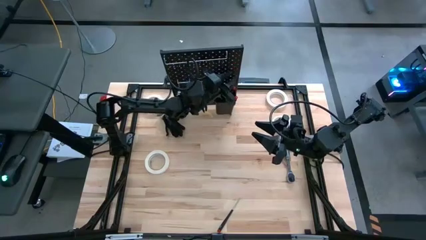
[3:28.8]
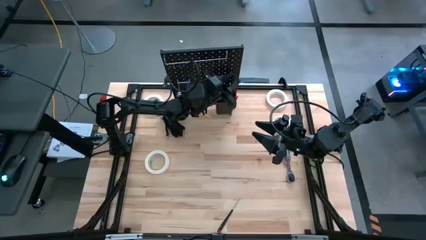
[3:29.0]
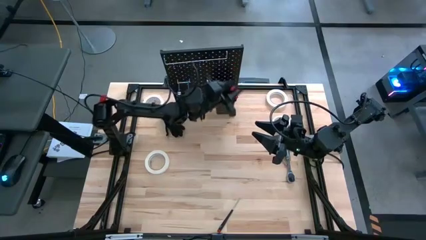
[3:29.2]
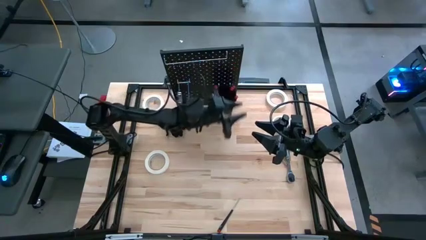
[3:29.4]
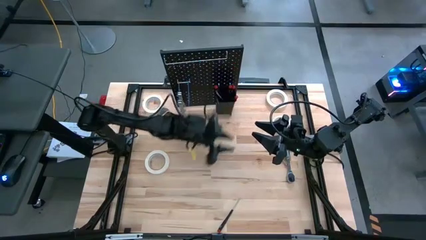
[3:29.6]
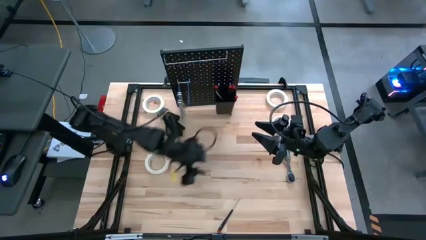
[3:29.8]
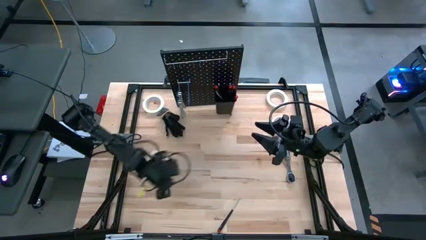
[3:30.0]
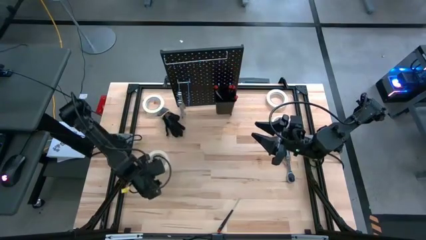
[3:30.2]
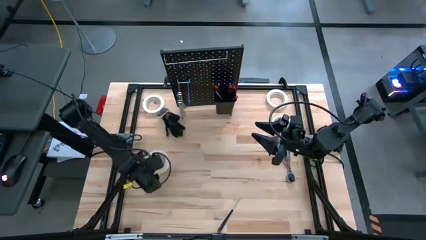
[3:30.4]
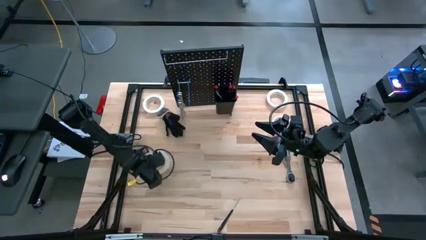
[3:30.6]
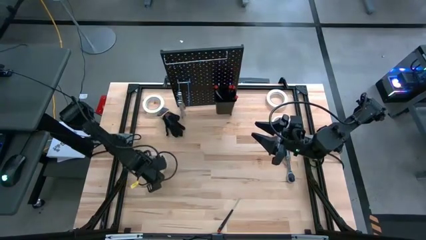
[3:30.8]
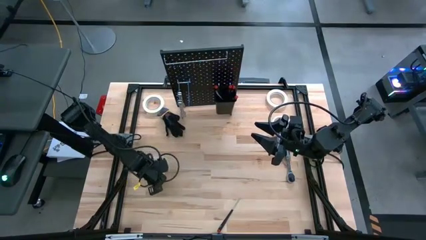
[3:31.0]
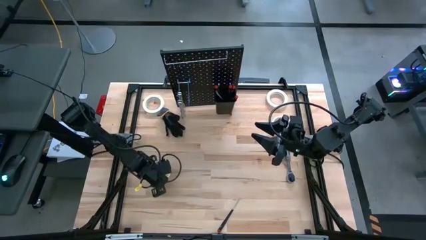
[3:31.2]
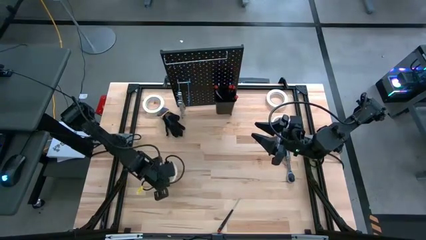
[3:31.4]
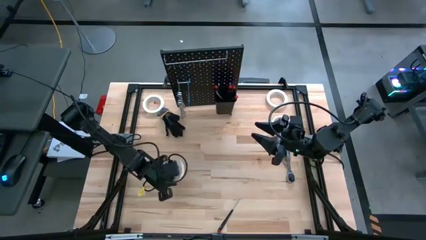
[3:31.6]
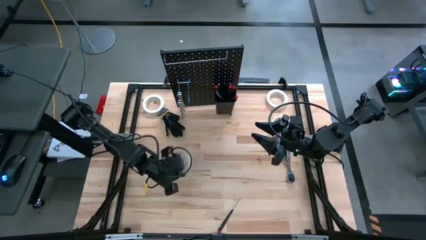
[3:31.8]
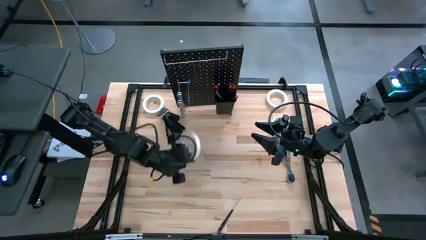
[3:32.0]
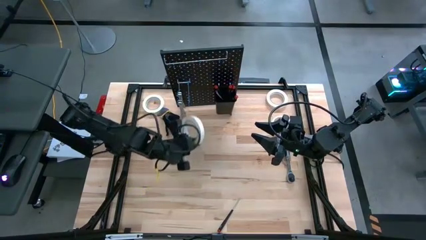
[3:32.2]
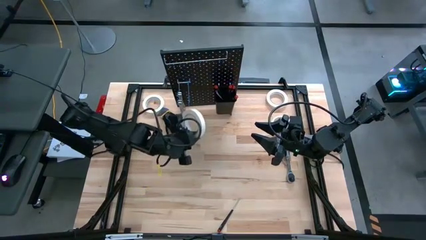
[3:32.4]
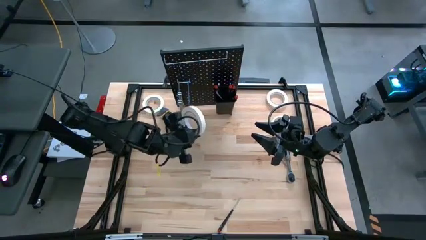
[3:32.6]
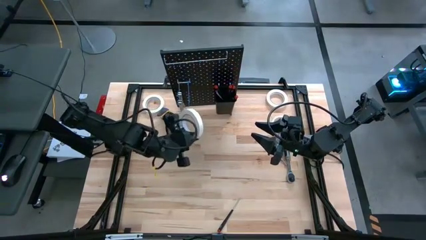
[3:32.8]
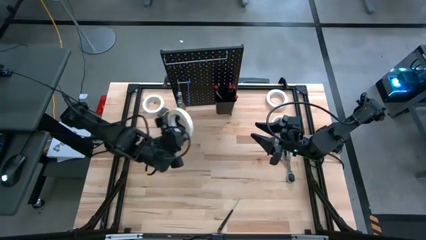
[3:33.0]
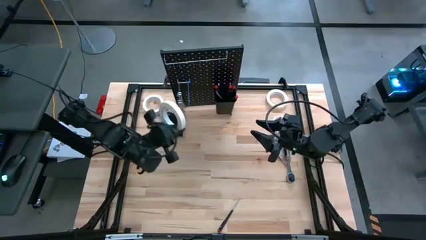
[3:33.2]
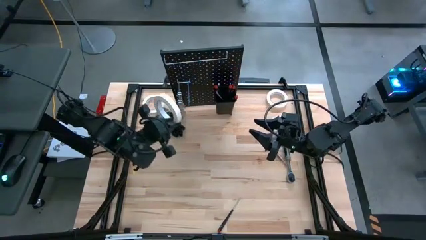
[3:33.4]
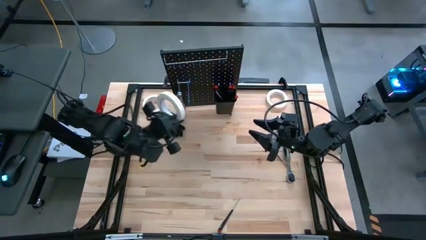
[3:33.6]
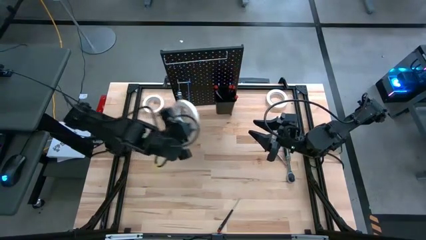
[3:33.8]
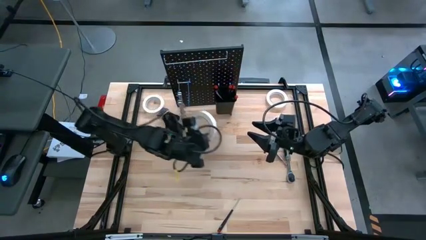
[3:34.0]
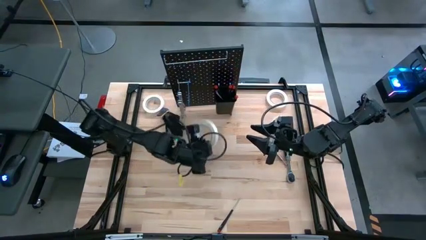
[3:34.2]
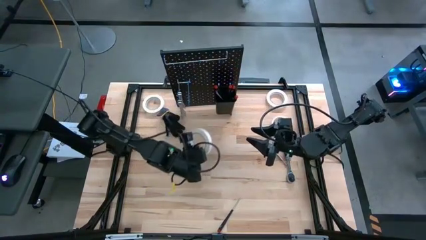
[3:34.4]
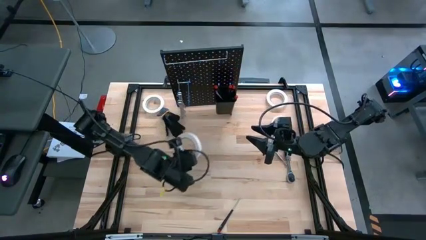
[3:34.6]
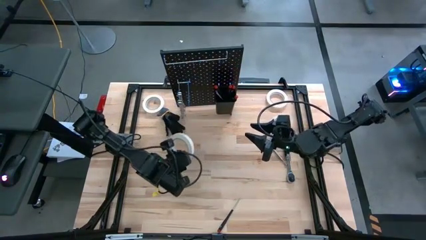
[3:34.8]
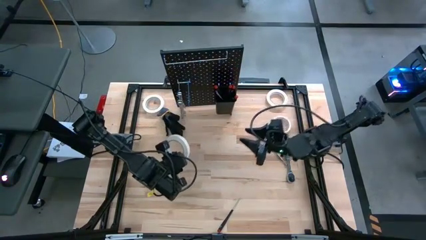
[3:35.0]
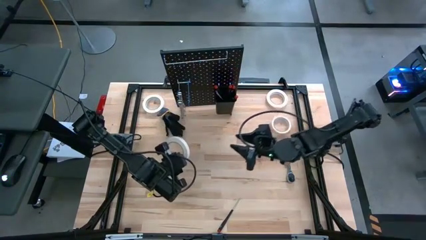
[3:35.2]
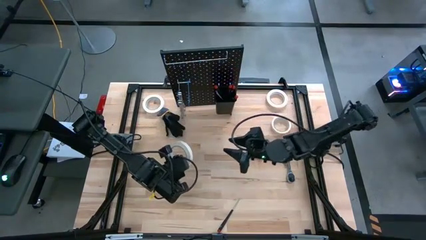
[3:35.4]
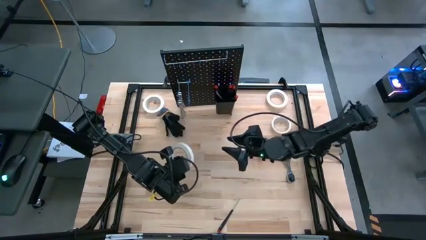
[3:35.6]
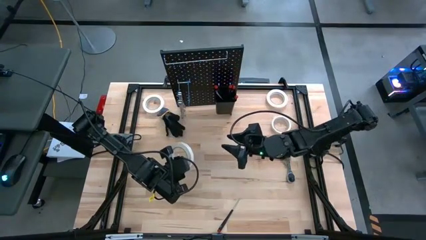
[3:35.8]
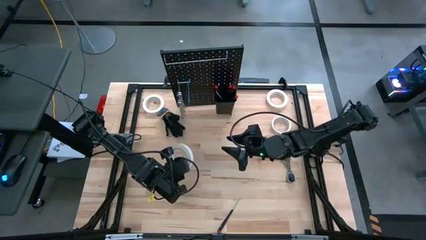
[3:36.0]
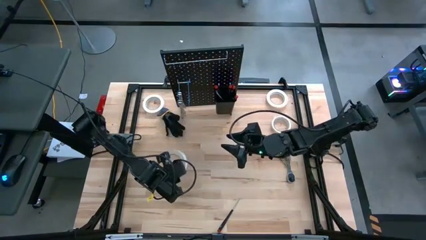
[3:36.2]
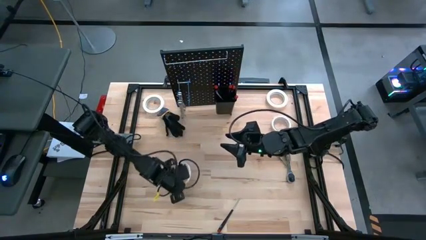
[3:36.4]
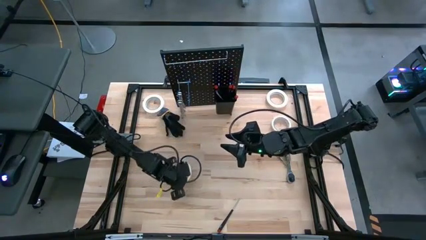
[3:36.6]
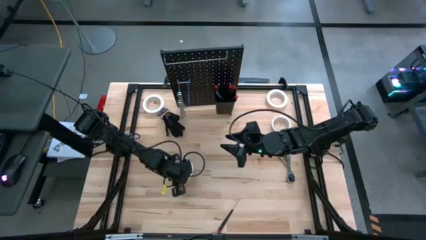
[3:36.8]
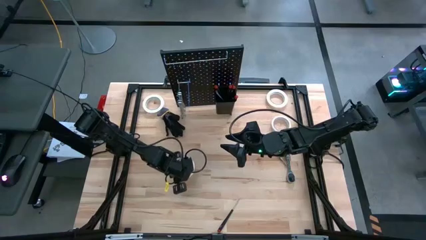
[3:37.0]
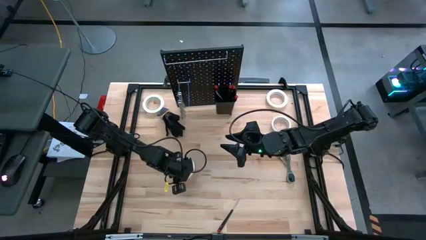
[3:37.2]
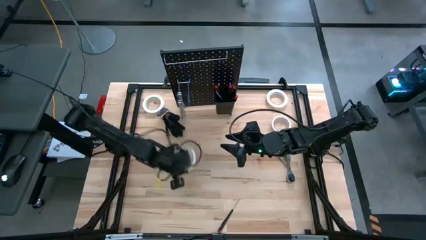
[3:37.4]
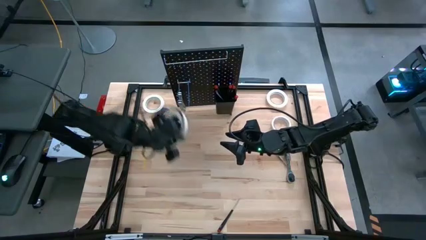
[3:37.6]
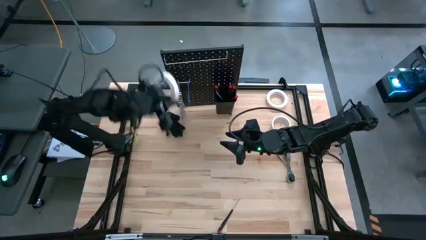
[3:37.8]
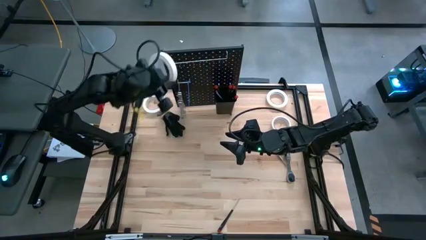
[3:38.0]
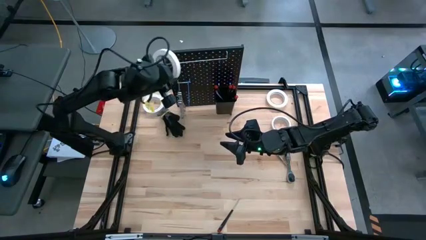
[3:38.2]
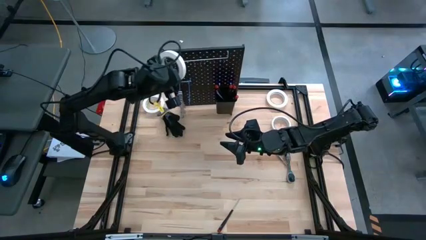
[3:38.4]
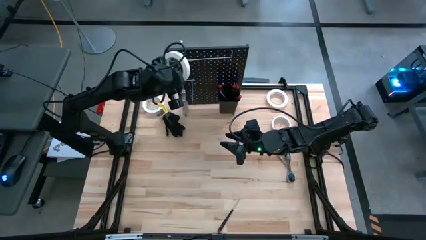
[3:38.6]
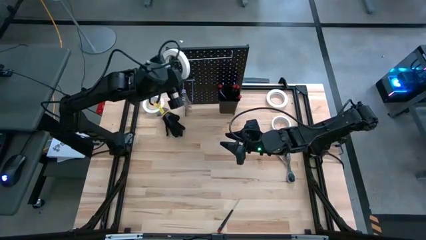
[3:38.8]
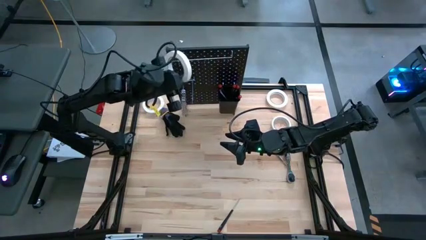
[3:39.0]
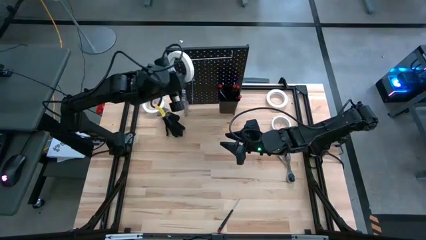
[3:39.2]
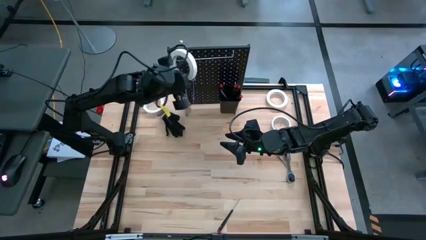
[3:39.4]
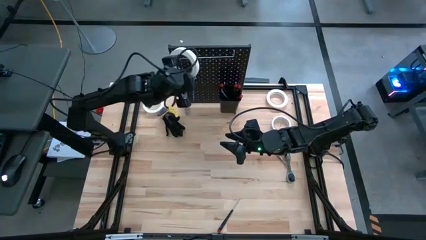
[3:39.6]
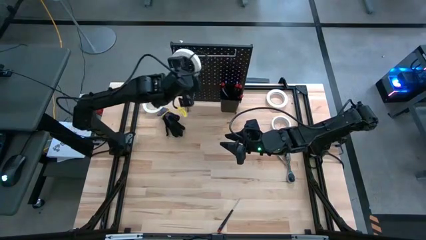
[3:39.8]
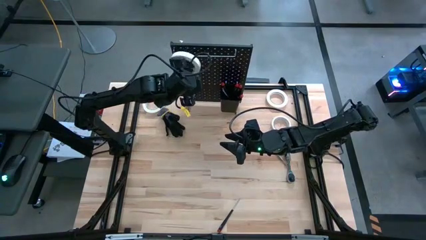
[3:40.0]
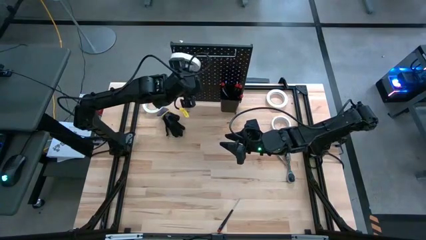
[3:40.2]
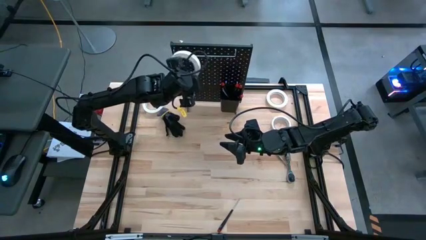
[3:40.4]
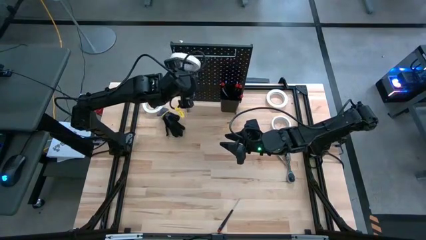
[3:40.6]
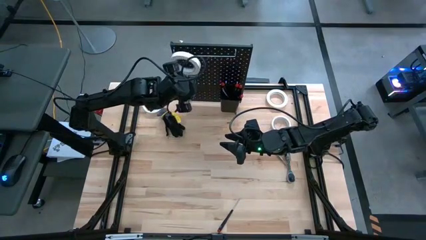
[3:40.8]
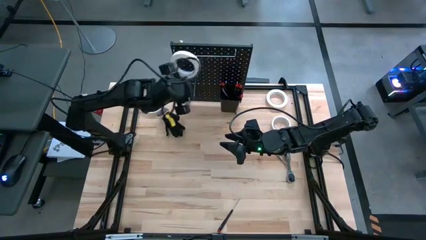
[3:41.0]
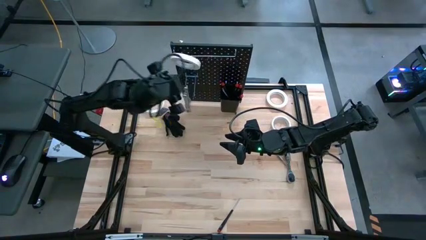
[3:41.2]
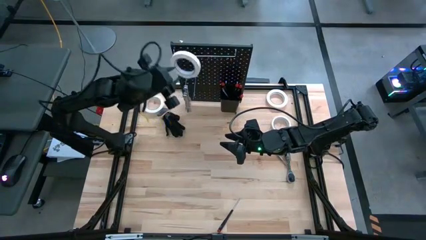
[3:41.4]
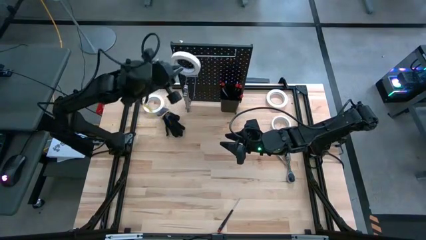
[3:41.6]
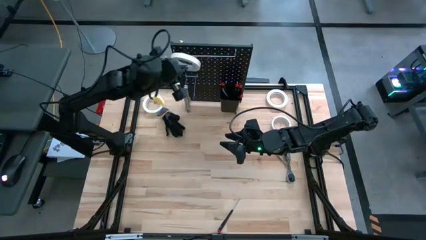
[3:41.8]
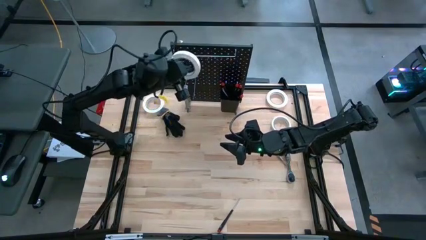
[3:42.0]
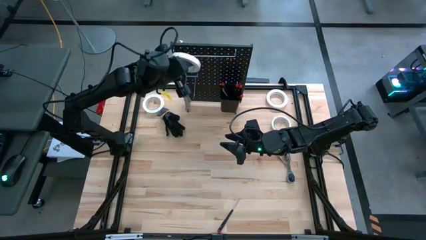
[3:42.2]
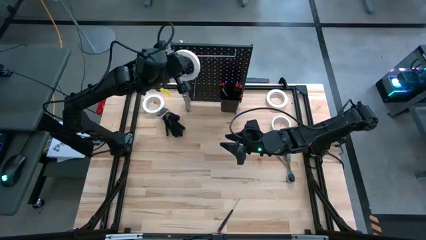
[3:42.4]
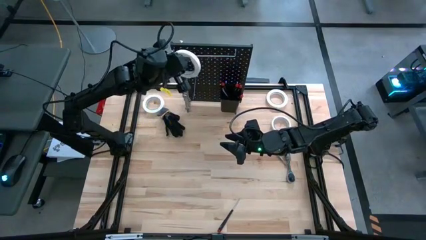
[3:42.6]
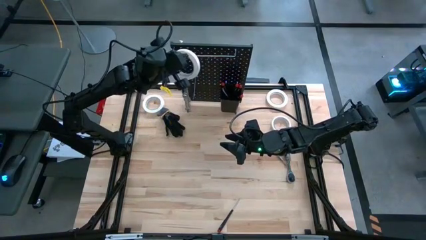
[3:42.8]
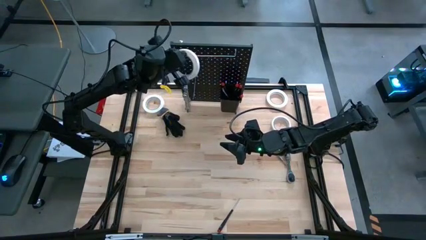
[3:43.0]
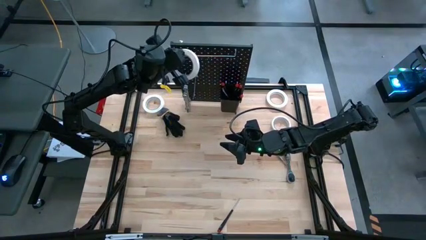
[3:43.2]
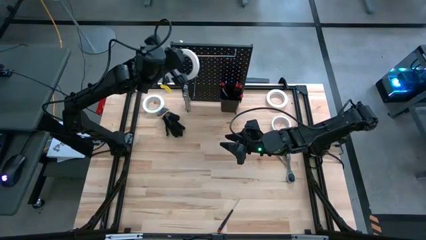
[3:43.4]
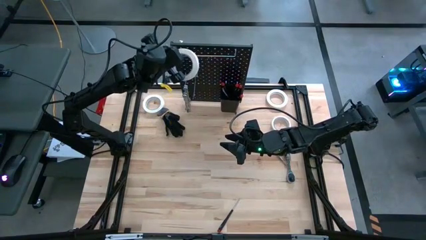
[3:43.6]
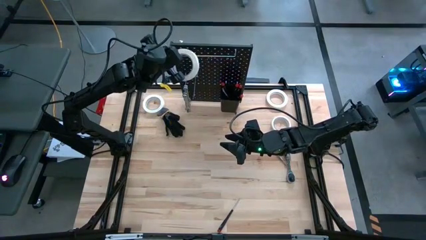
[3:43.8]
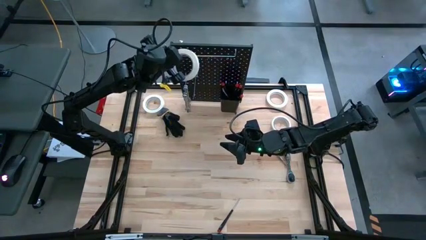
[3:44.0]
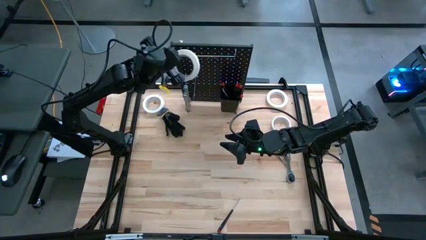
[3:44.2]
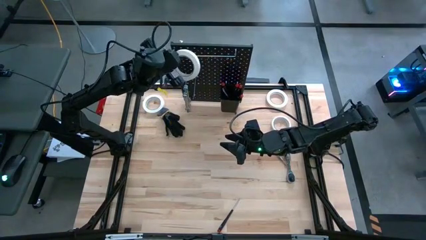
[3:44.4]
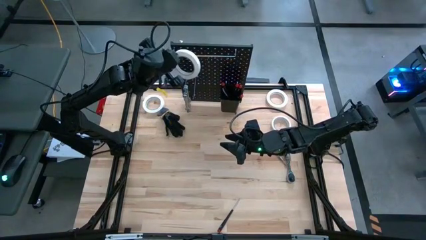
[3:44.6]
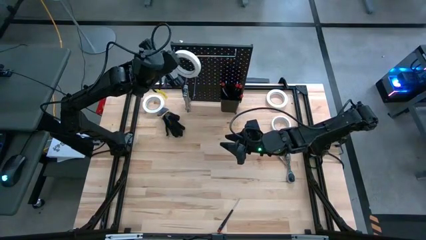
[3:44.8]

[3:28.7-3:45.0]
Task: Hang tools onto peg board
Hang the white masking tape on the peg board
